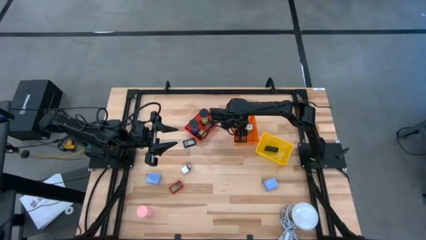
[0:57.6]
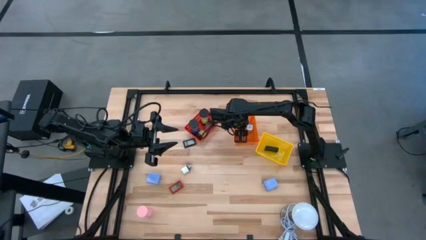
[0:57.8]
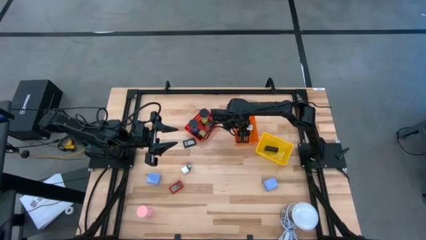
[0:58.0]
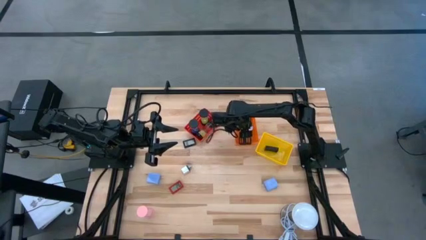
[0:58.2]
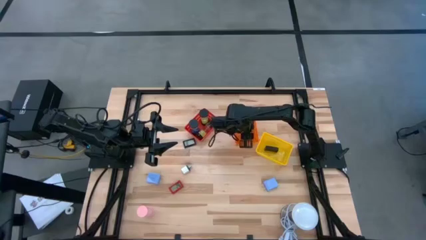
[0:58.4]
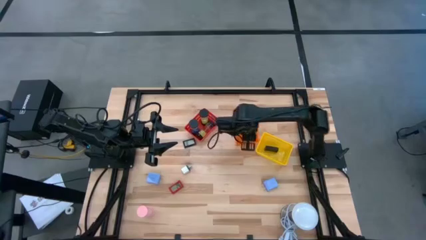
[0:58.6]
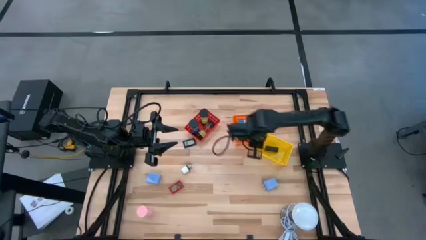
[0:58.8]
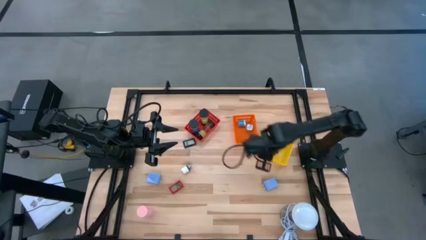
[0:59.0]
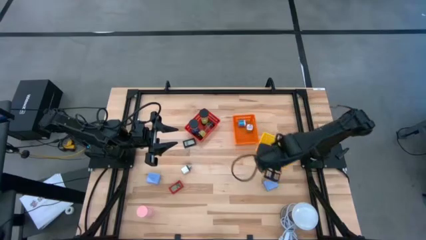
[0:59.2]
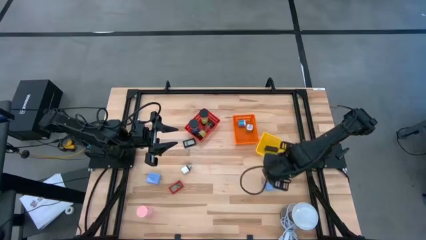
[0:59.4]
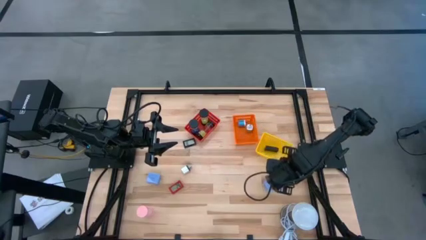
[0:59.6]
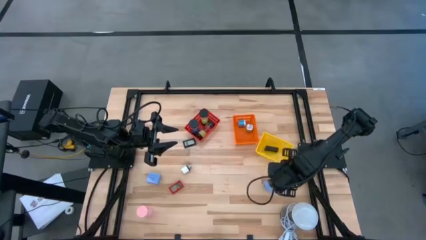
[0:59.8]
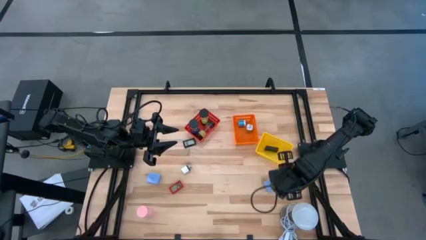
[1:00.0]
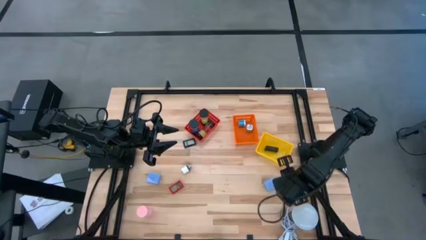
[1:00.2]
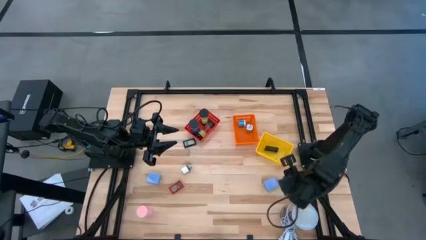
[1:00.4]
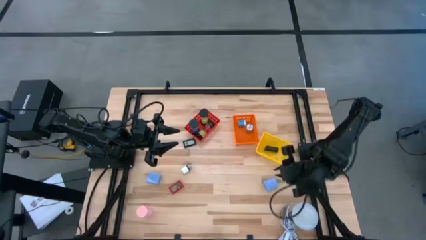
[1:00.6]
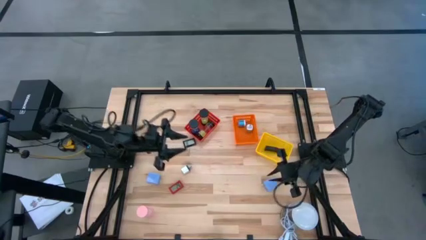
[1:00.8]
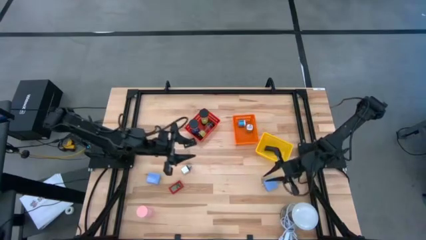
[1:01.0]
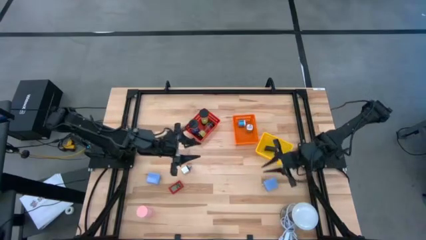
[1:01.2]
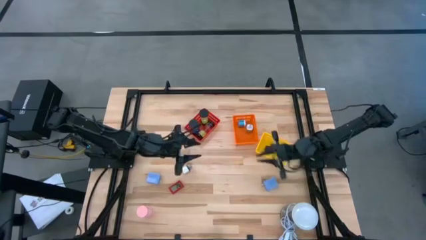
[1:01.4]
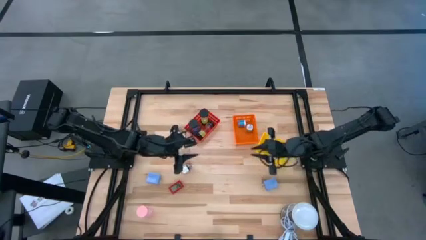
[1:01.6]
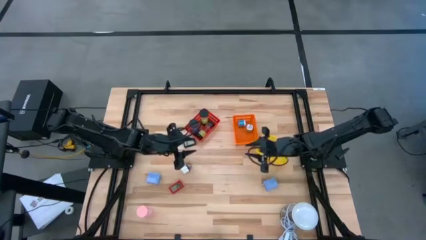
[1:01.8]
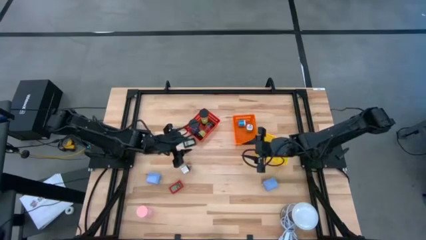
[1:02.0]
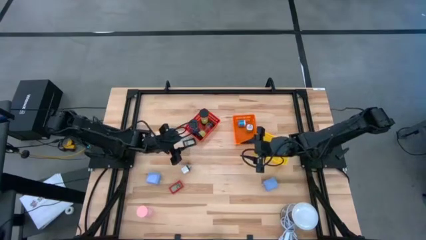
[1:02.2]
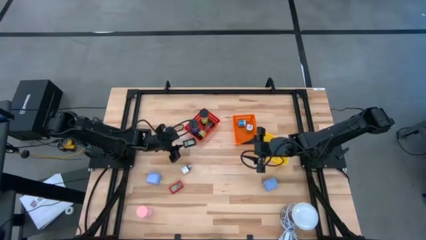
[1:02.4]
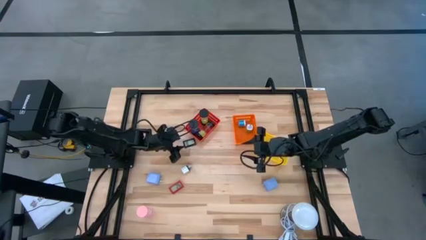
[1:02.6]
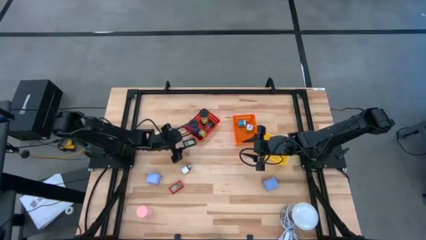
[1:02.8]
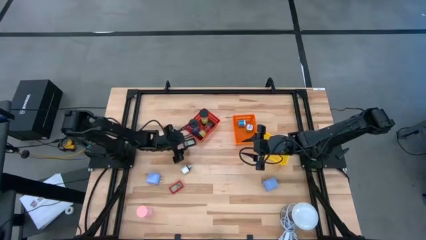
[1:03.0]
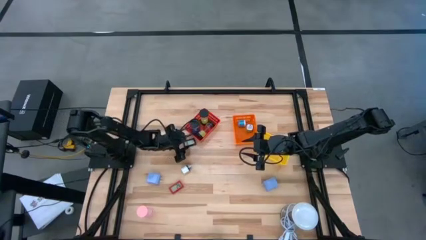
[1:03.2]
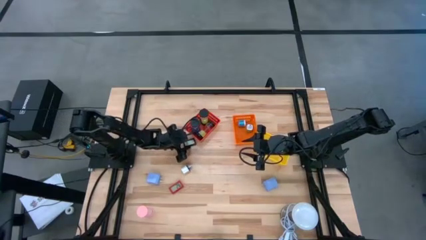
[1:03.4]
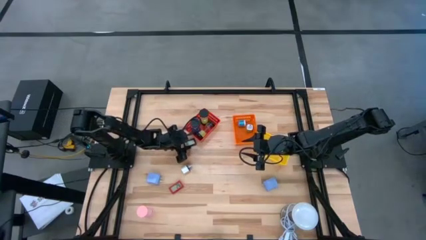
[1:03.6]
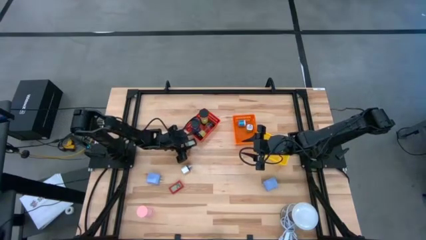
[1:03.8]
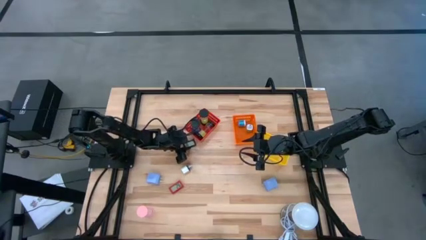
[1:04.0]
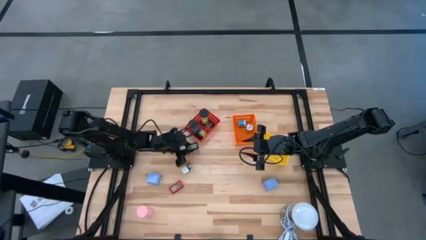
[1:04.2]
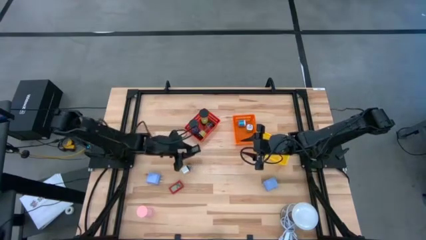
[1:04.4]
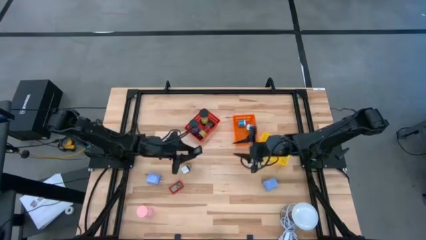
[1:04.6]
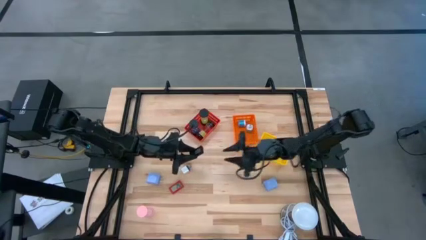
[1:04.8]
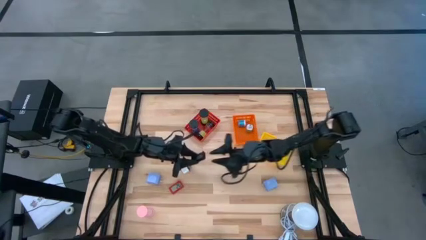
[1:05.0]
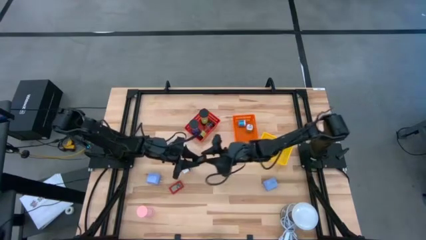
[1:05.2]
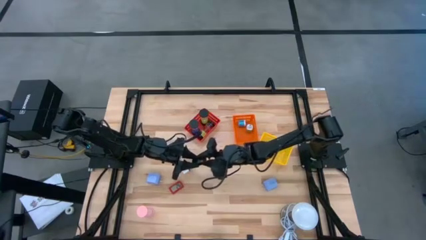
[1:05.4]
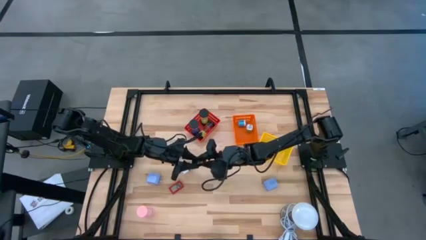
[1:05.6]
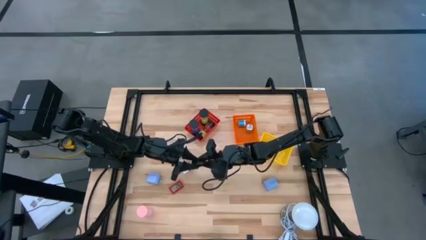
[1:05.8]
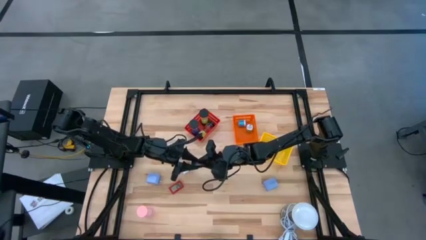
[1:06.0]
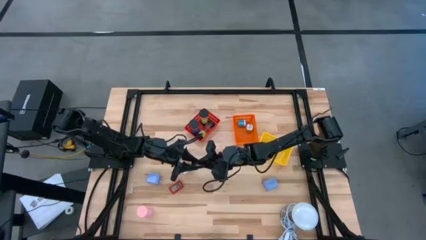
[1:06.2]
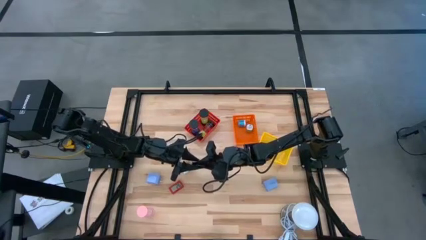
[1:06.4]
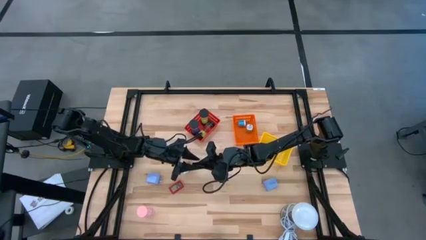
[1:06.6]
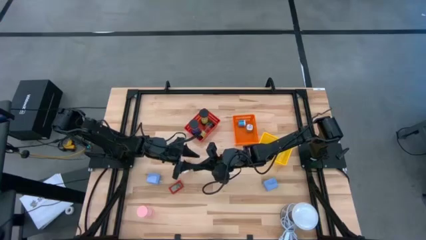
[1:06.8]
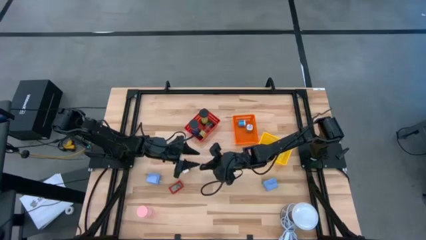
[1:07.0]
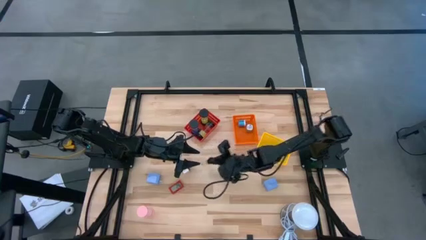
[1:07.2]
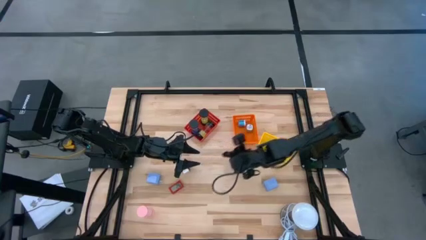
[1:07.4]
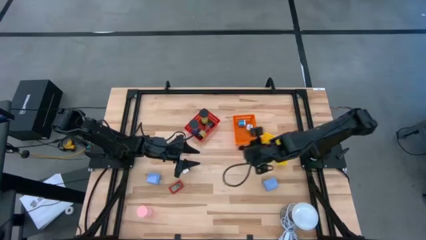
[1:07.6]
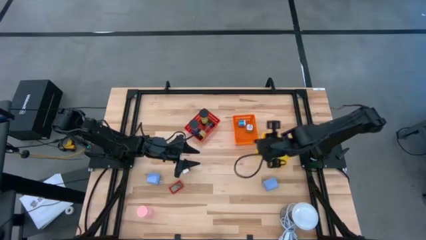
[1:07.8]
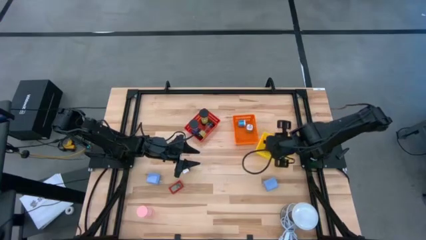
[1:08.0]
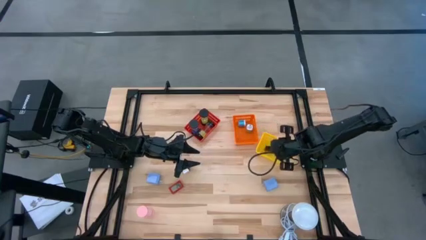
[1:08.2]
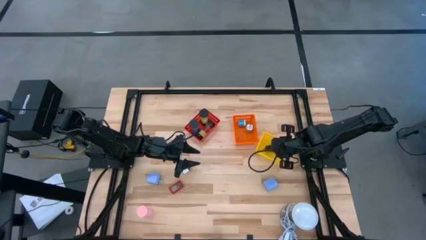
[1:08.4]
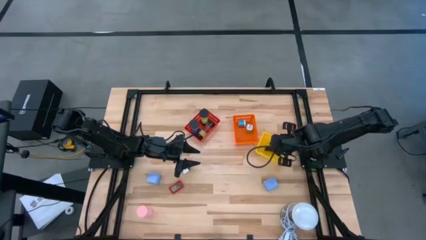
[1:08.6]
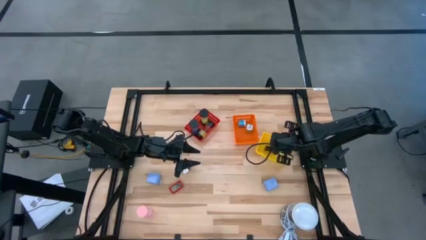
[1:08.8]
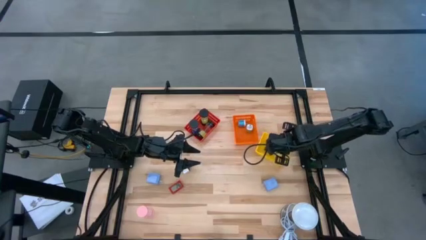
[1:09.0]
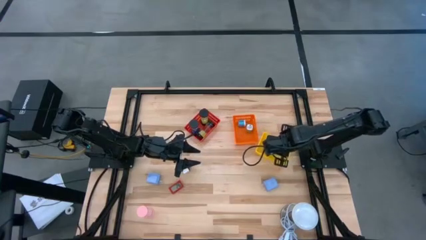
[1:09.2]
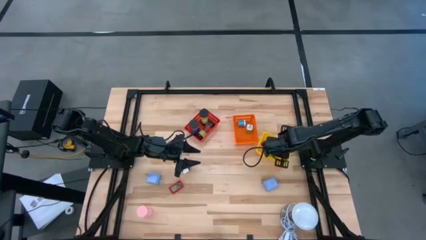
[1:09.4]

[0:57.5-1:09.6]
Task: Pick & Place Office items
Put the black digital timer into the yellow bin

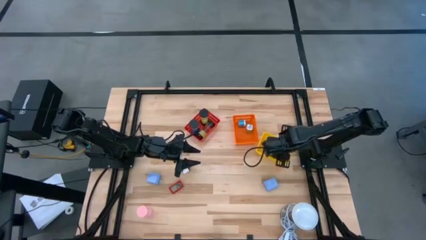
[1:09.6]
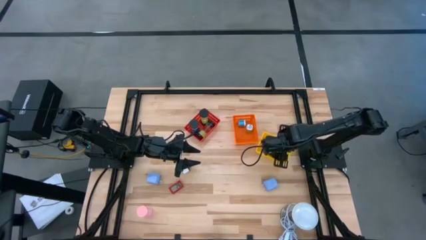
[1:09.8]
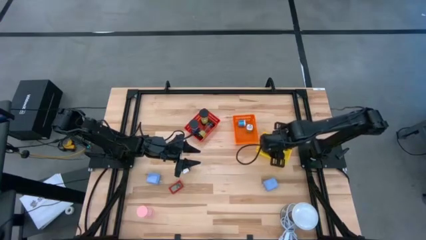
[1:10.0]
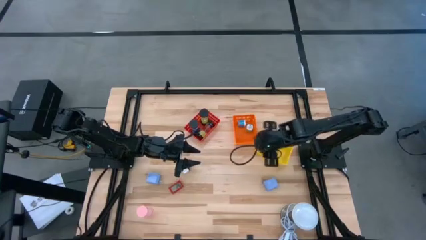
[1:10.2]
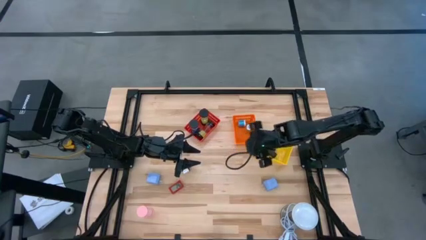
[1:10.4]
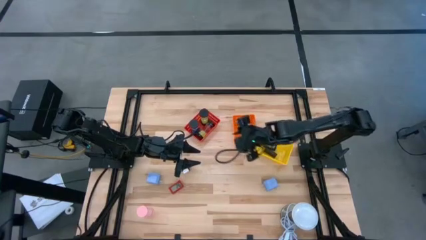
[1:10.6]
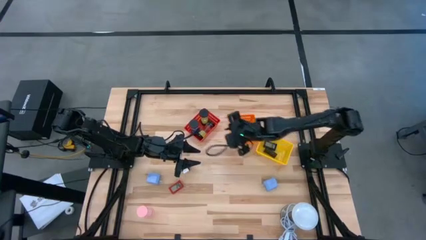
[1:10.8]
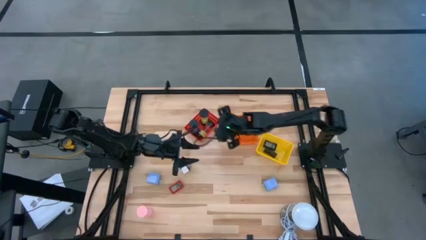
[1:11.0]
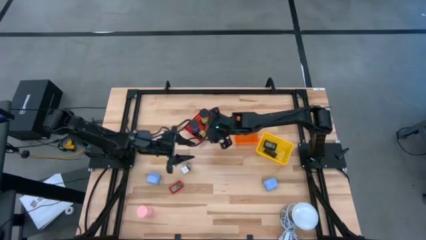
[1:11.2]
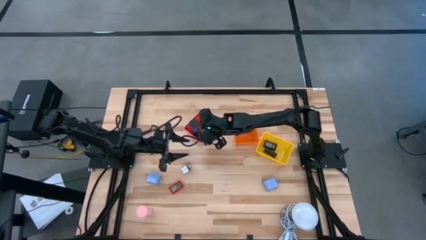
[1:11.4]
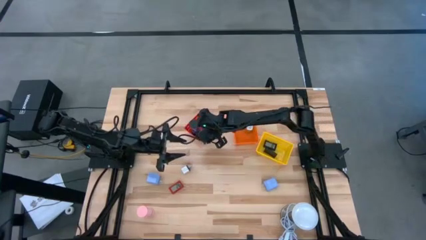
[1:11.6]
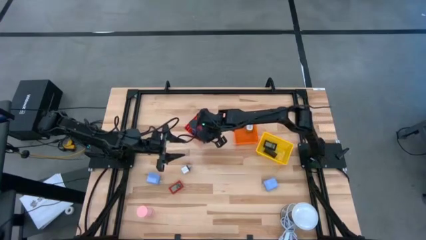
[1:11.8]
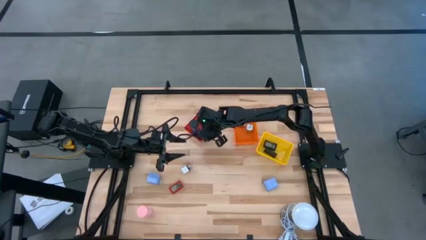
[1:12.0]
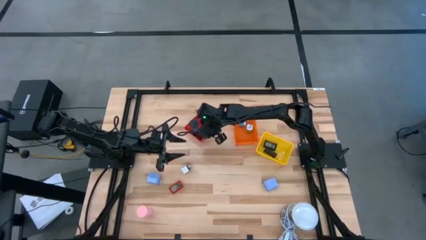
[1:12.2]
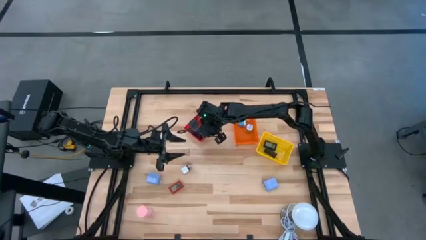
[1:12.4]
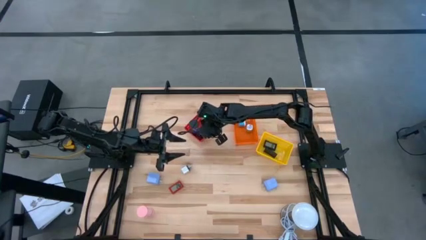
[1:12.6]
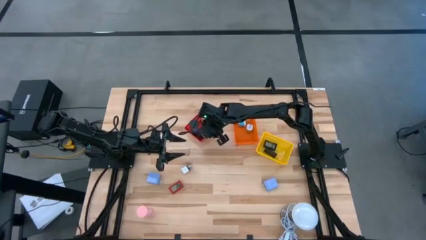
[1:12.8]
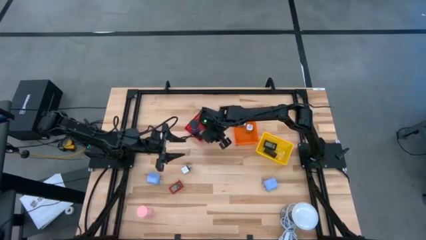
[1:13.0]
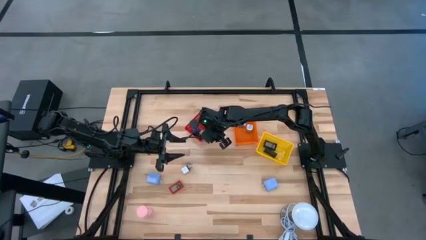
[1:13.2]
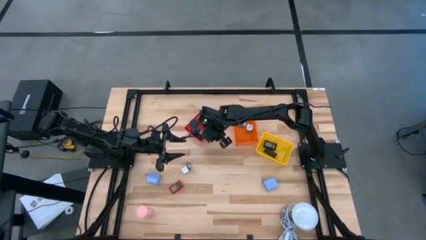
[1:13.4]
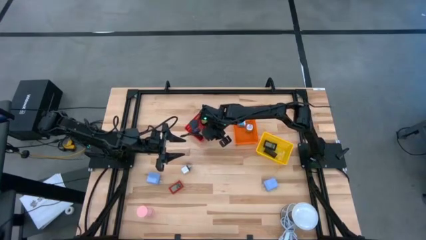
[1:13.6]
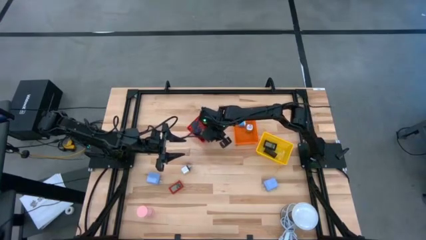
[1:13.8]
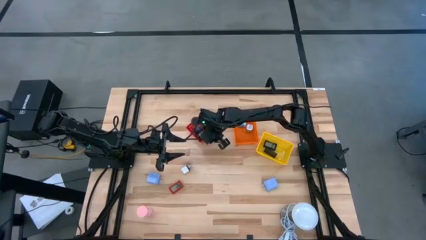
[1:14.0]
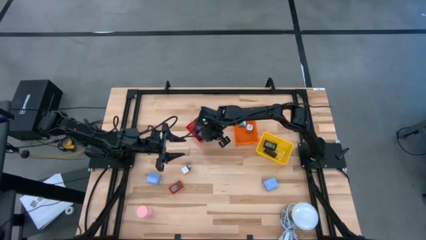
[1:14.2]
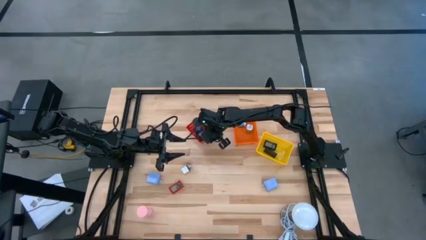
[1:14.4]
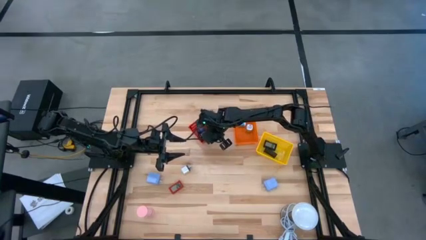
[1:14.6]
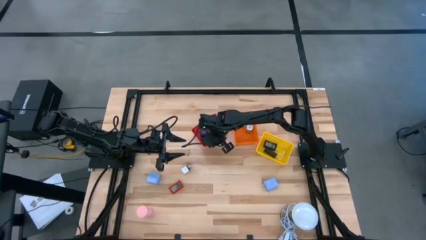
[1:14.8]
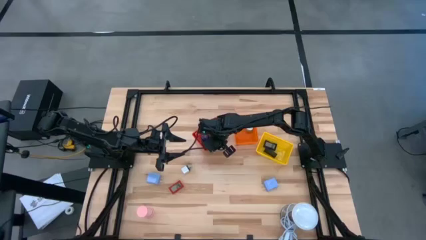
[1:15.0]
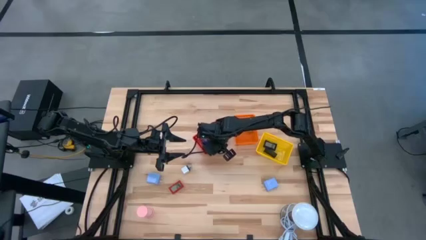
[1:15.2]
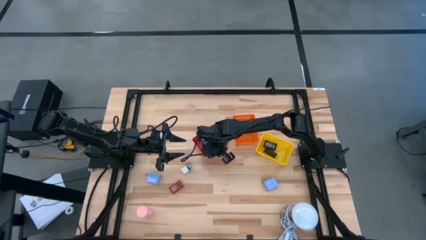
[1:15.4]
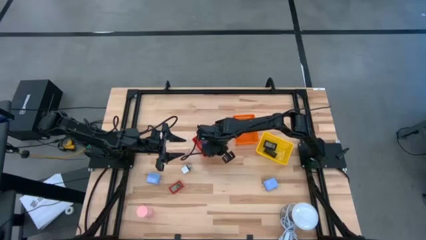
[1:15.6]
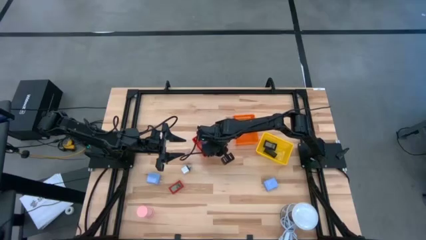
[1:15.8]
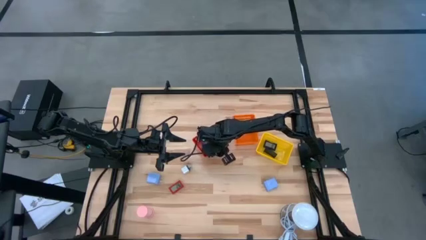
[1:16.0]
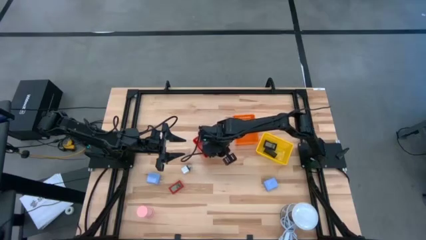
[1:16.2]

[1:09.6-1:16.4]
Adjust the red bin
